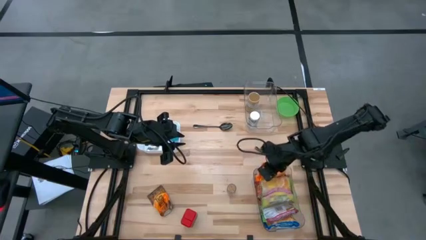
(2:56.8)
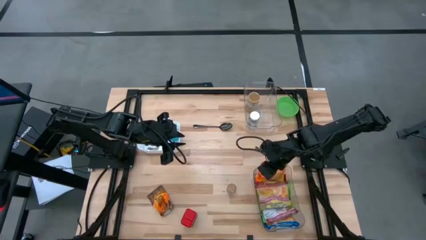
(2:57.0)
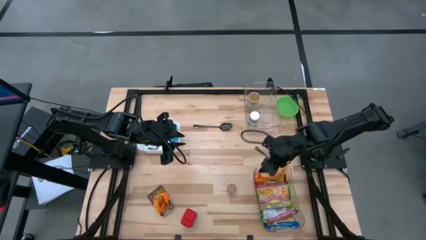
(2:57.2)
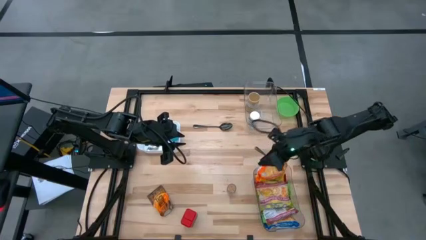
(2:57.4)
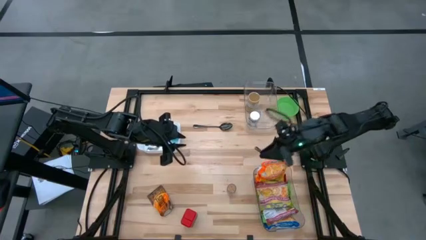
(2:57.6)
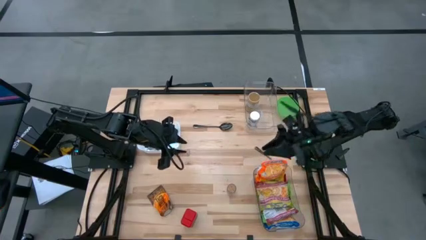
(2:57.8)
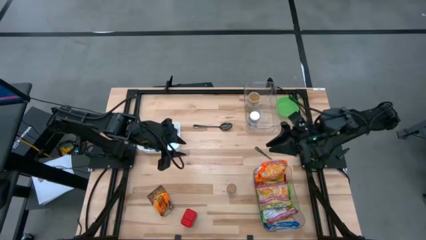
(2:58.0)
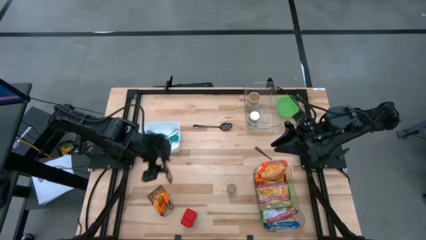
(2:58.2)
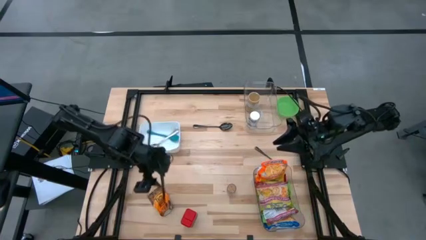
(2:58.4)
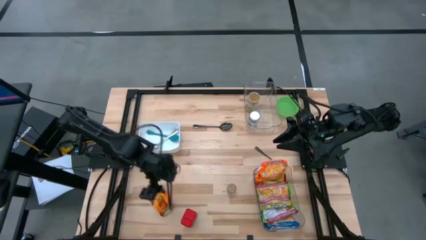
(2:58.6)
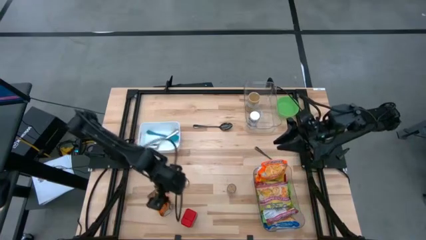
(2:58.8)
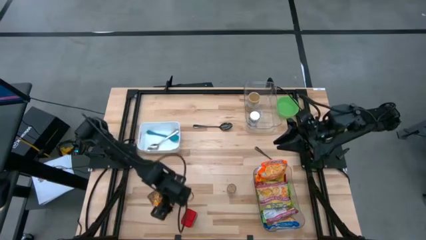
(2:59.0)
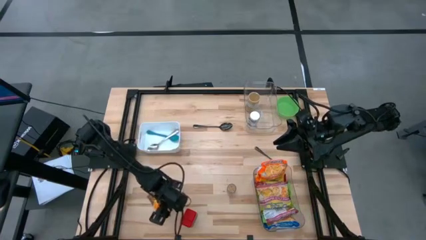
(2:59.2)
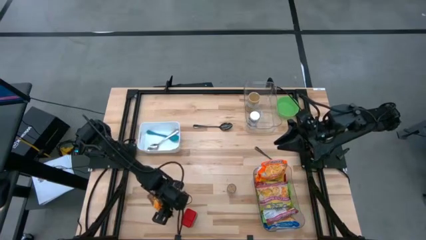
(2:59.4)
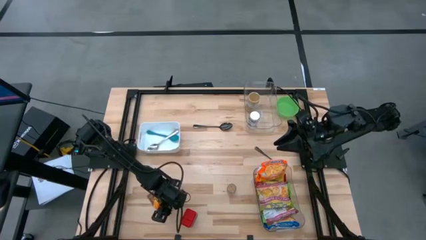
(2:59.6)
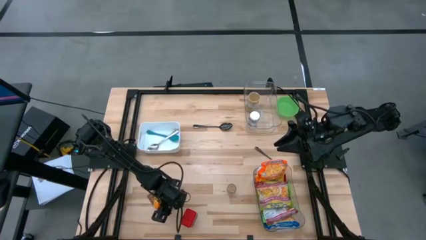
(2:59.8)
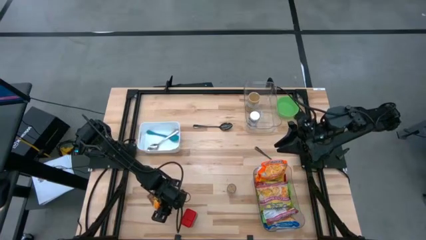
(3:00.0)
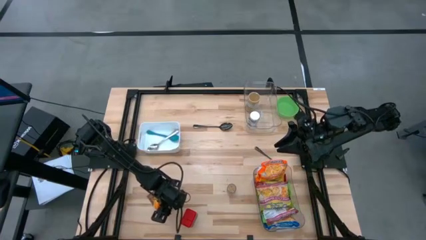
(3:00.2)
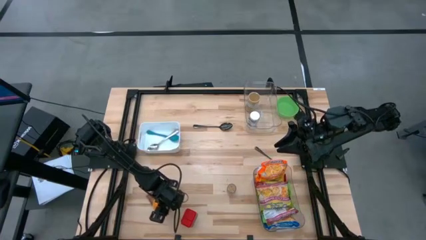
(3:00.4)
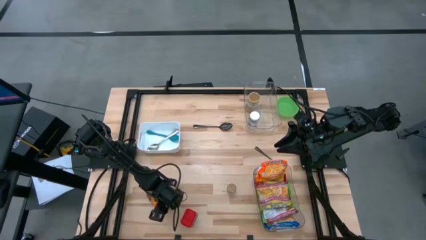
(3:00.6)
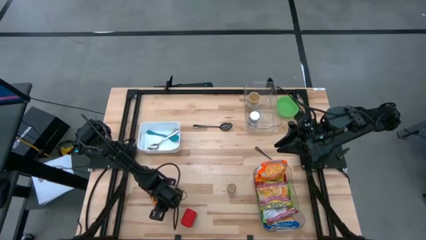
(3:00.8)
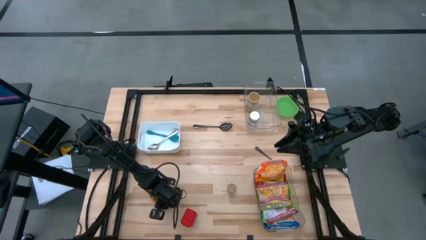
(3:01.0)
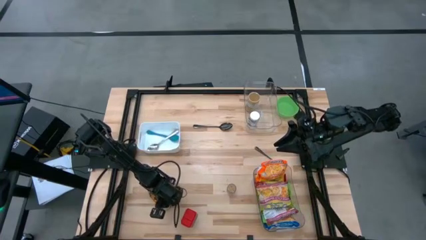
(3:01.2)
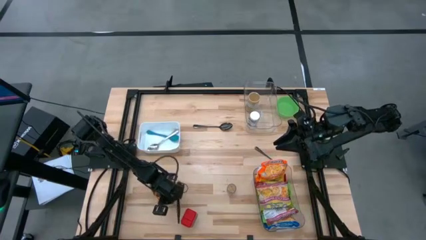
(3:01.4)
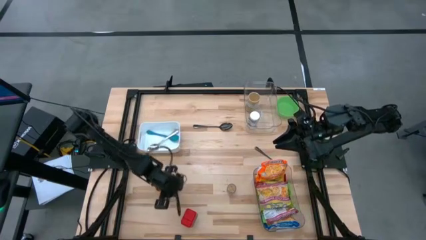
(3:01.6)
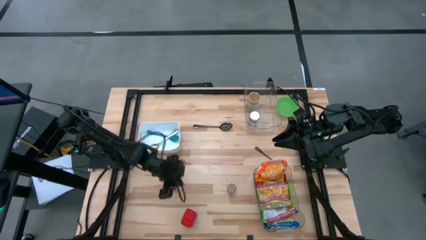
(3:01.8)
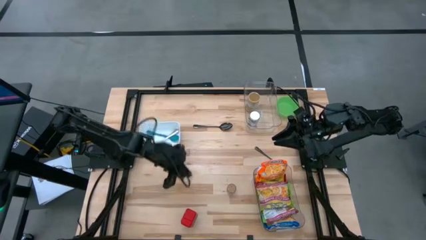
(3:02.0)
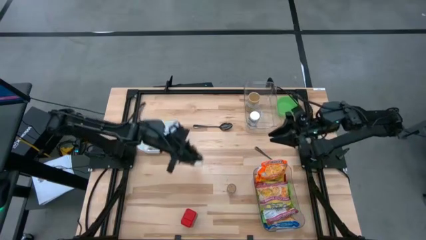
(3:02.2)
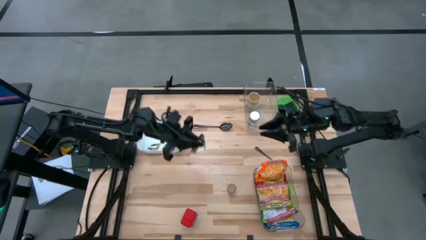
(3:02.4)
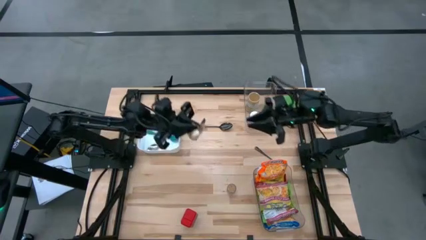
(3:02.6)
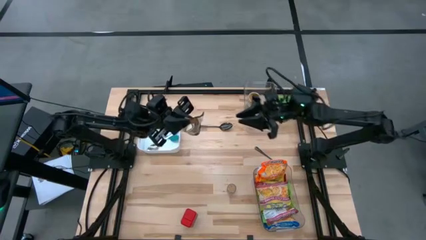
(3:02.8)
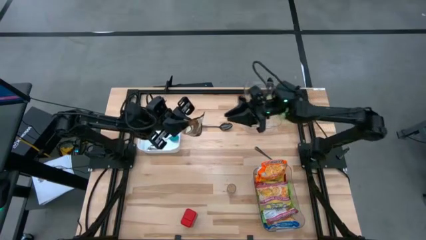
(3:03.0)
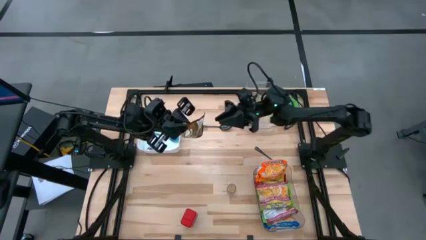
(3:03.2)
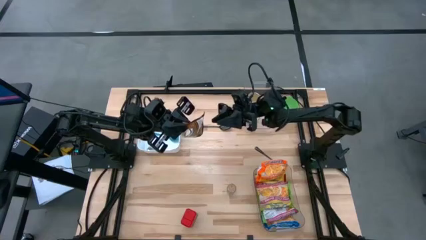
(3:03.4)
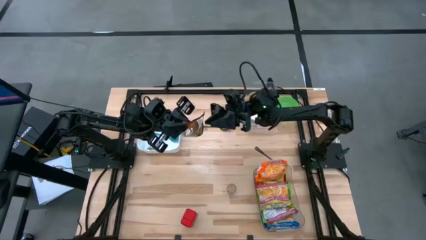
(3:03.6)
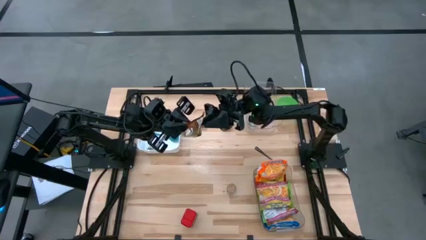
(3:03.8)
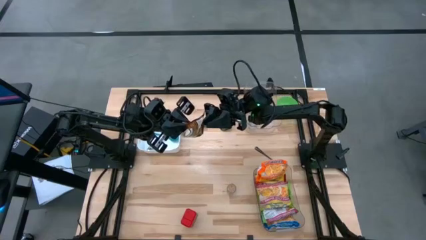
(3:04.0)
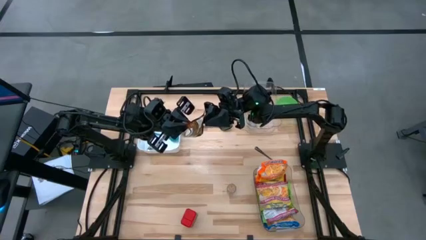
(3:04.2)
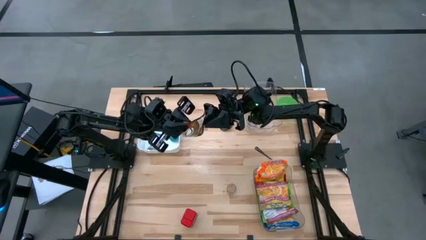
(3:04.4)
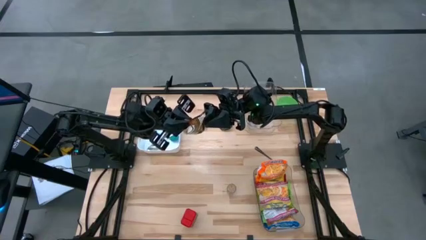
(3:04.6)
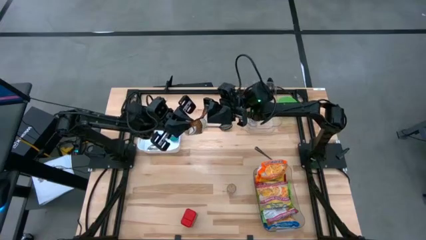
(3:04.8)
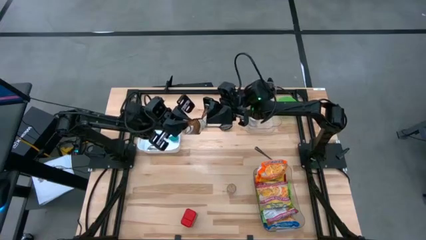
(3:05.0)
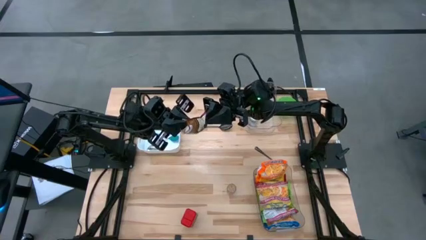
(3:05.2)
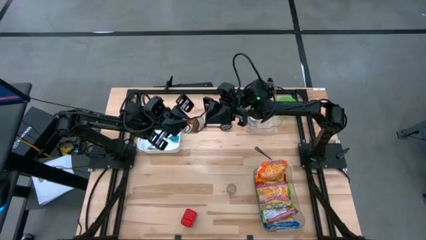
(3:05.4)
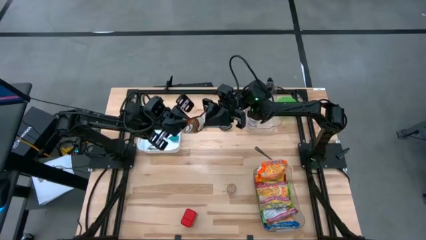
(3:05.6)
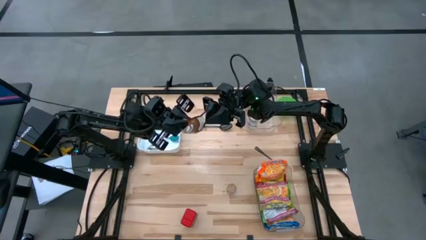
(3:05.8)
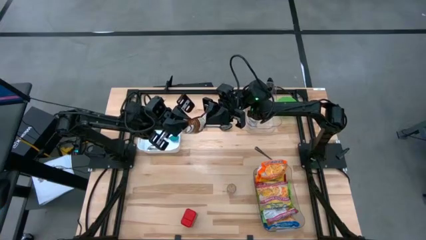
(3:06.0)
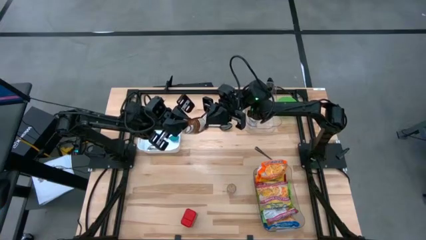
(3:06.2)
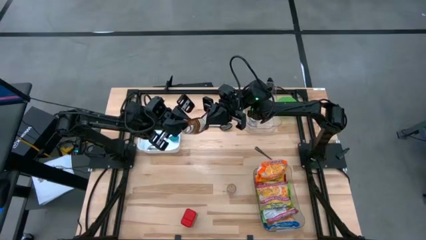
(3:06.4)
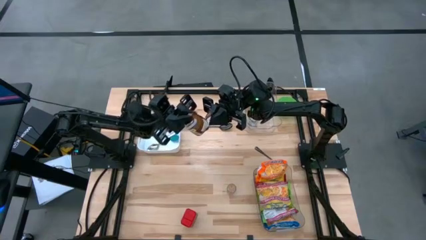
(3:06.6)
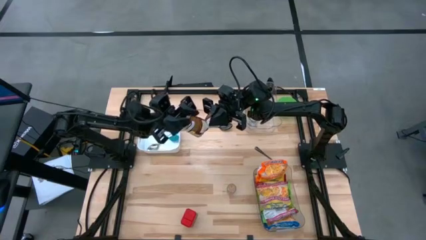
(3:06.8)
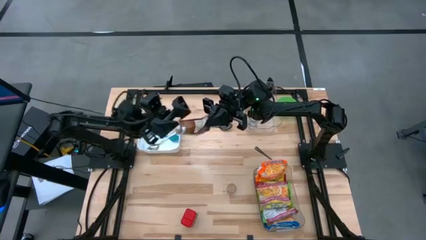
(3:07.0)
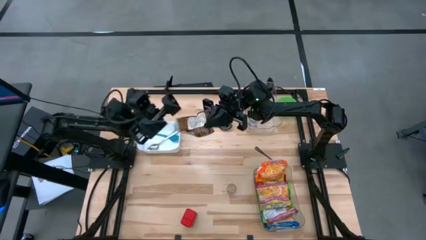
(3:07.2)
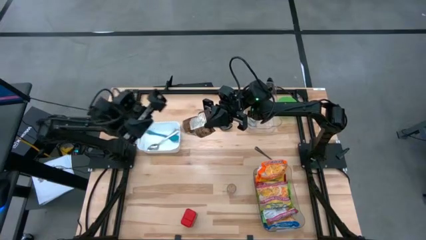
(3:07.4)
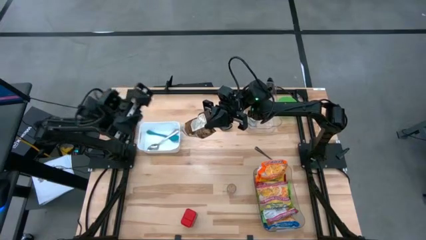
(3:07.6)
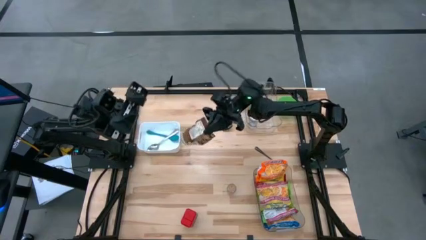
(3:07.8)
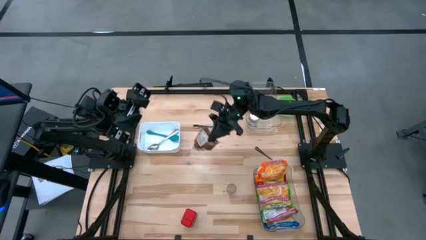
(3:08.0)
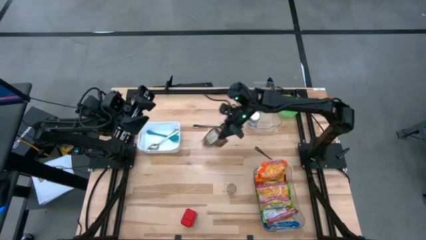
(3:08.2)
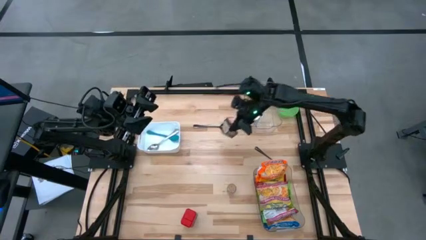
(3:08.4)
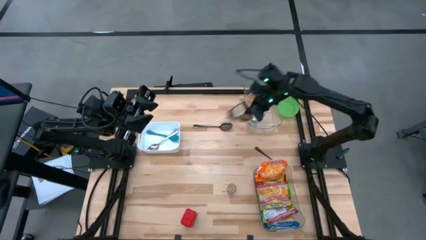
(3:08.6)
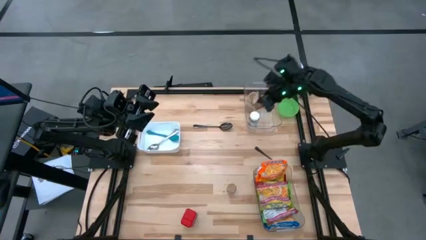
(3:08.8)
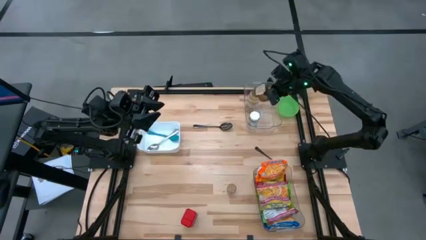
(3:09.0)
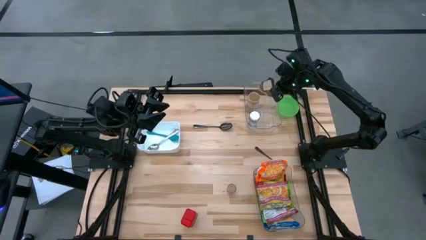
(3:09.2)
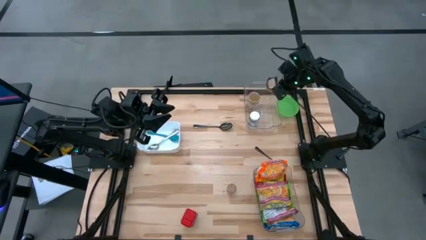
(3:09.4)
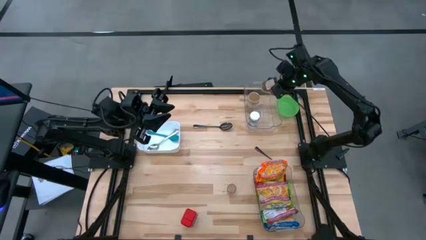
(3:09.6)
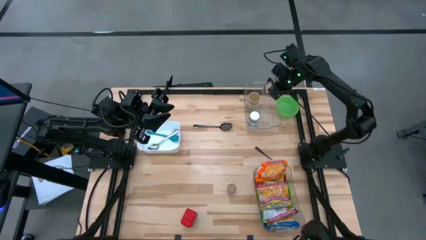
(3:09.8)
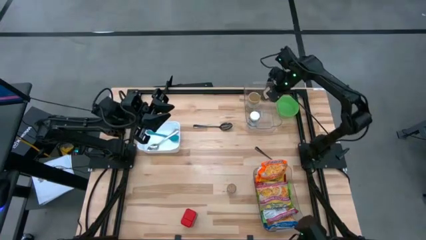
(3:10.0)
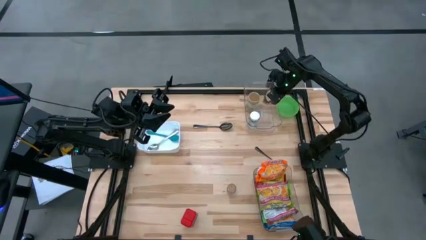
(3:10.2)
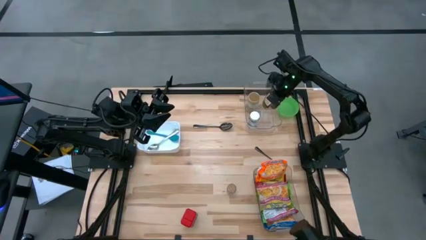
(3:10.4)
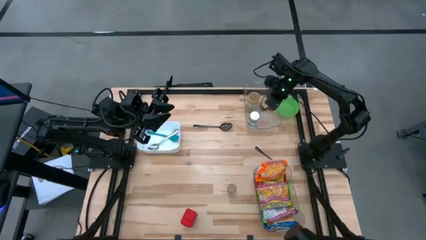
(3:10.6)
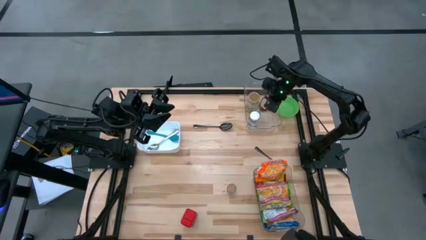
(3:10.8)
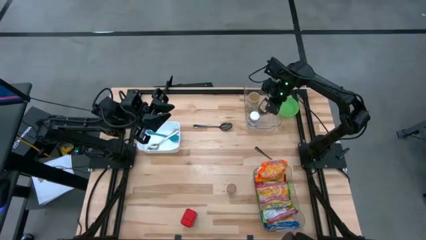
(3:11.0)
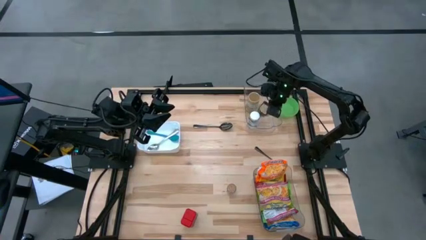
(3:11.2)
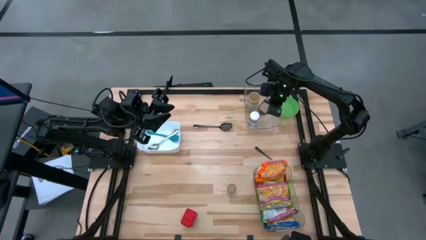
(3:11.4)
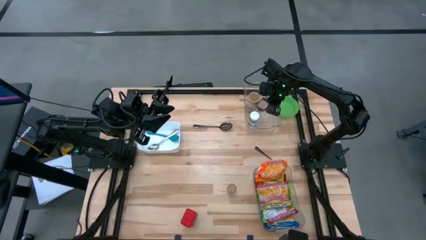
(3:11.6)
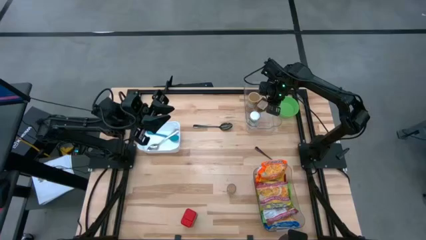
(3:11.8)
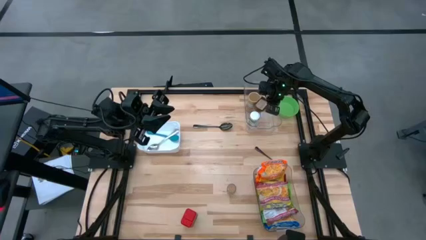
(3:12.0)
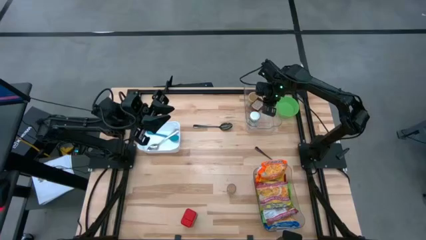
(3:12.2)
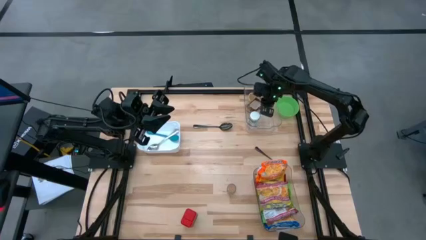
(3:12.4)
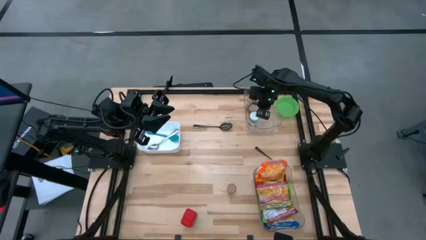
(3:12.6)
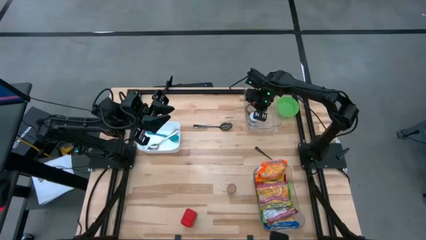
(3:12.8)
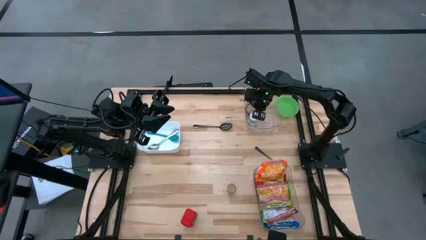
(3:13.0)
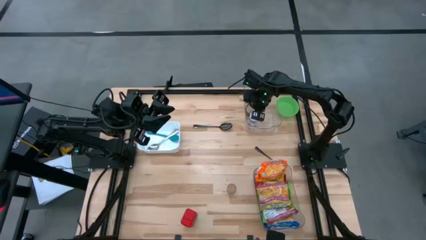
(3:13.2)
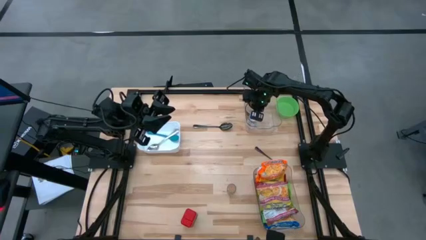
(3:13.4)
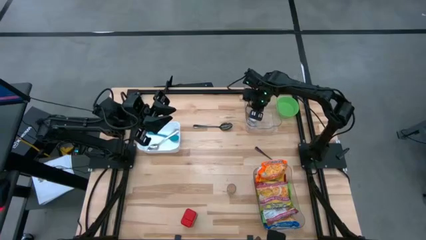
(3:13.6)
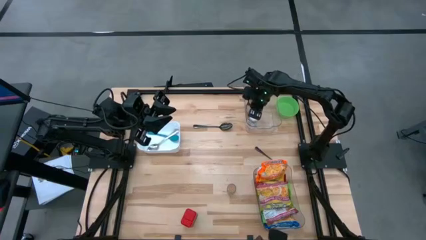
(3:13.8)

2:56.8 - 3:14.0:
Task: Pick & Place Food Item
Put the orange seasoning pack into the top transparent bin
